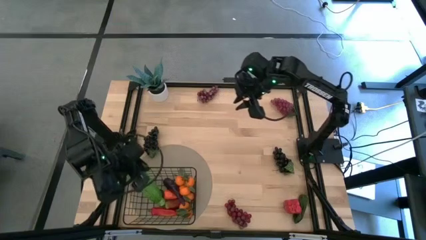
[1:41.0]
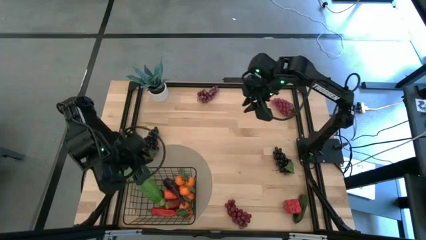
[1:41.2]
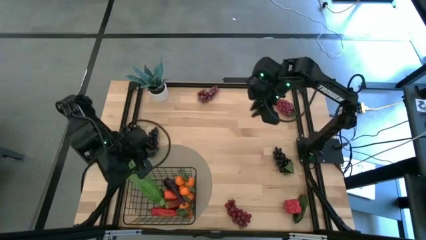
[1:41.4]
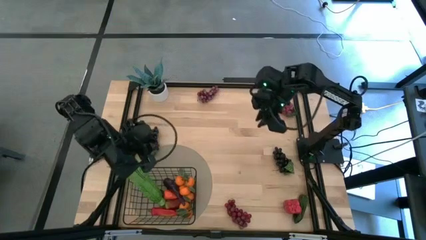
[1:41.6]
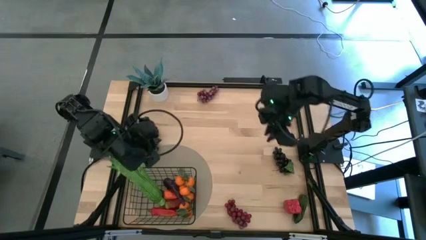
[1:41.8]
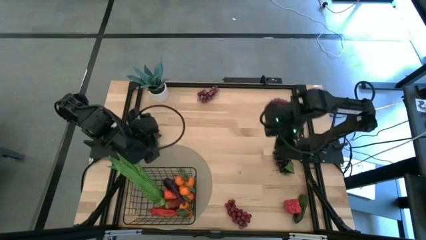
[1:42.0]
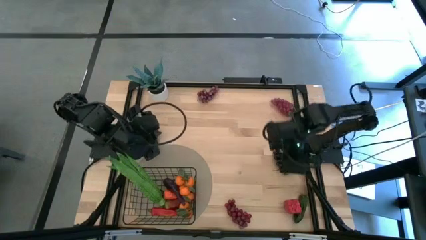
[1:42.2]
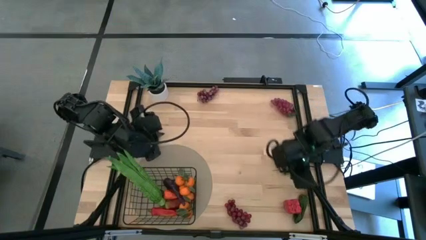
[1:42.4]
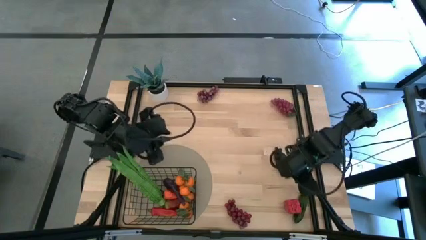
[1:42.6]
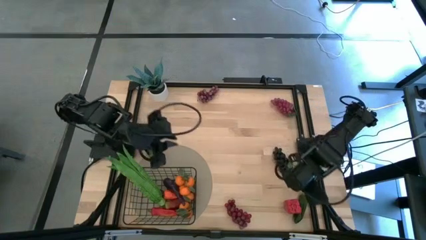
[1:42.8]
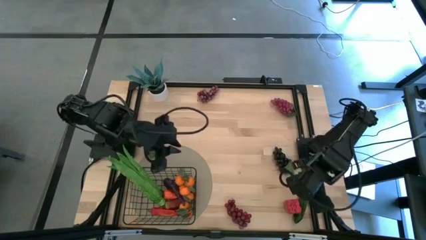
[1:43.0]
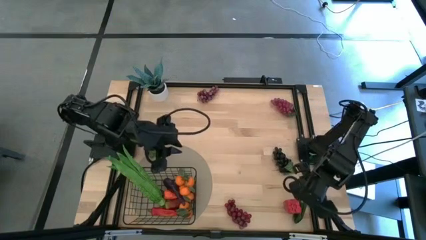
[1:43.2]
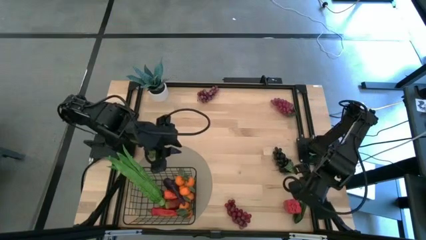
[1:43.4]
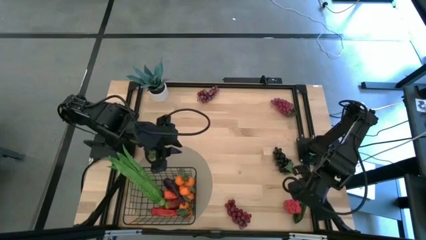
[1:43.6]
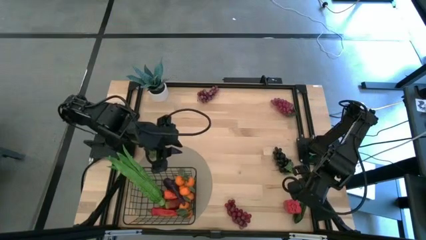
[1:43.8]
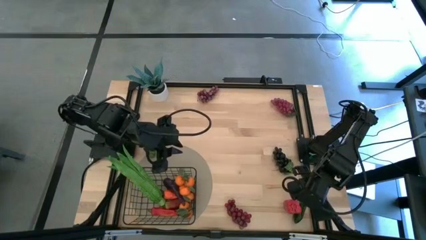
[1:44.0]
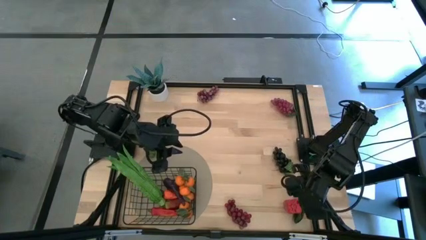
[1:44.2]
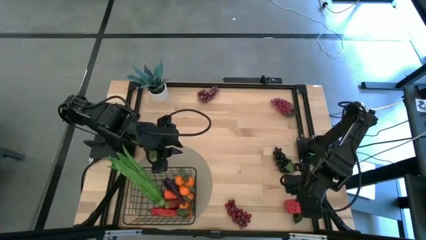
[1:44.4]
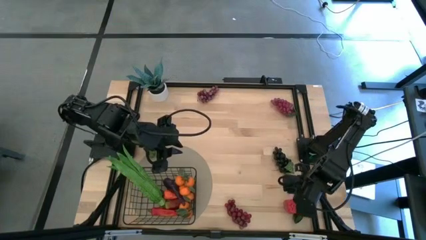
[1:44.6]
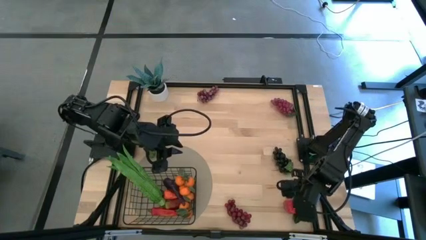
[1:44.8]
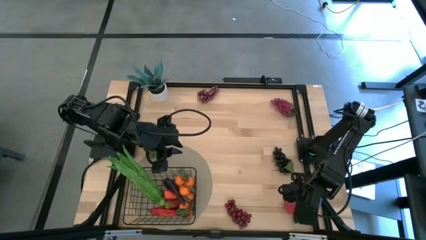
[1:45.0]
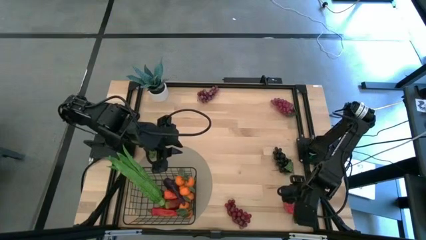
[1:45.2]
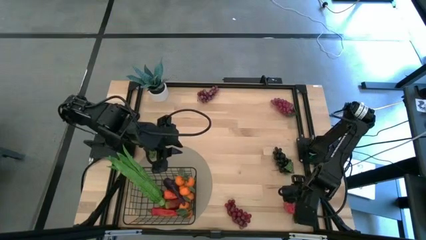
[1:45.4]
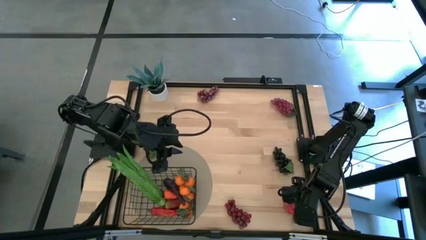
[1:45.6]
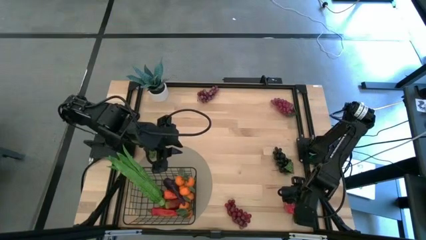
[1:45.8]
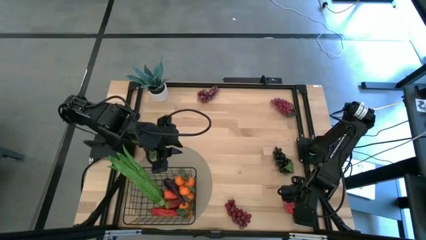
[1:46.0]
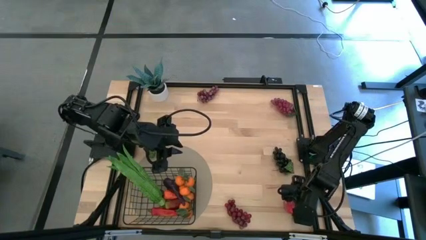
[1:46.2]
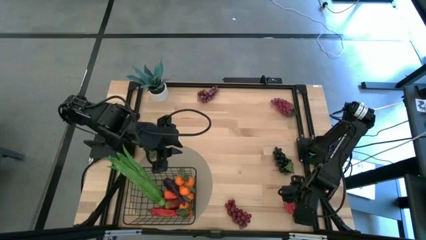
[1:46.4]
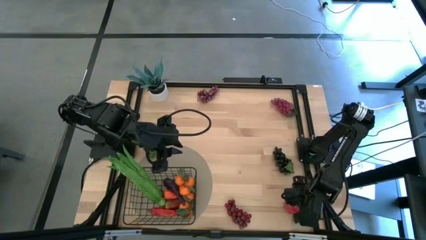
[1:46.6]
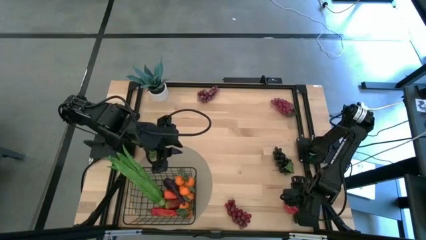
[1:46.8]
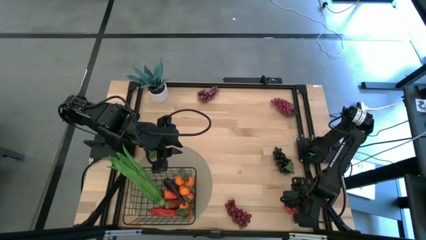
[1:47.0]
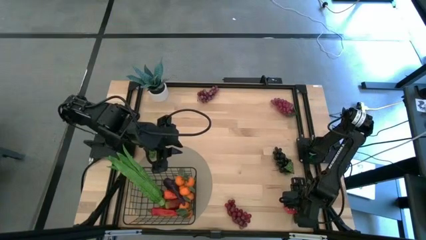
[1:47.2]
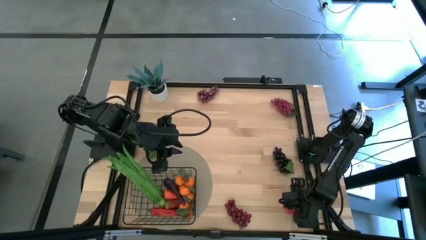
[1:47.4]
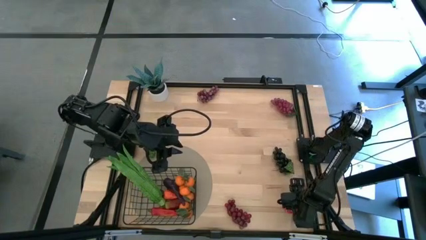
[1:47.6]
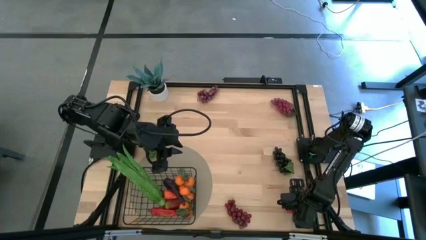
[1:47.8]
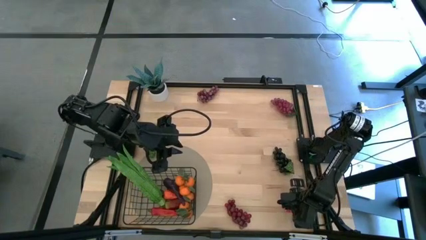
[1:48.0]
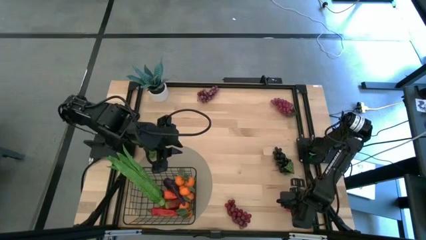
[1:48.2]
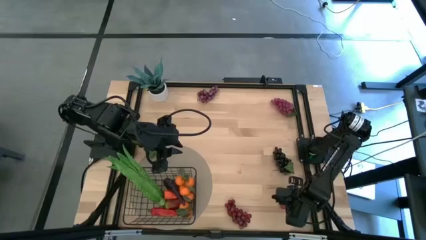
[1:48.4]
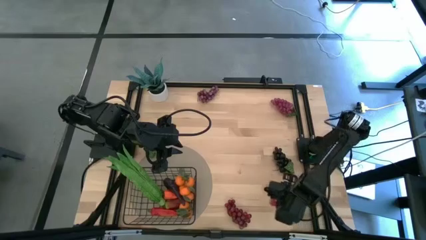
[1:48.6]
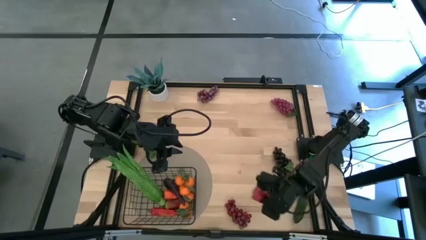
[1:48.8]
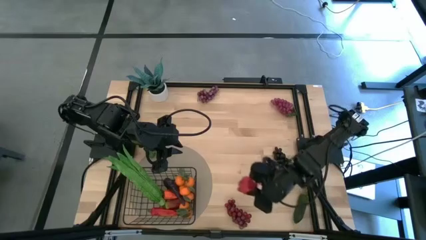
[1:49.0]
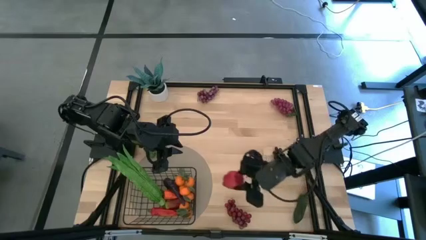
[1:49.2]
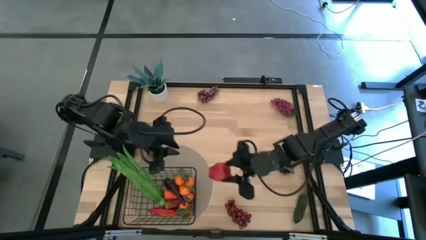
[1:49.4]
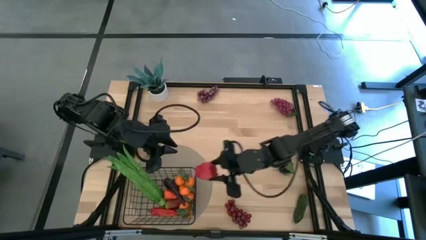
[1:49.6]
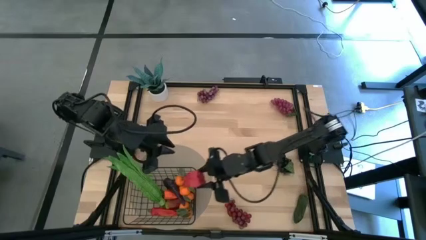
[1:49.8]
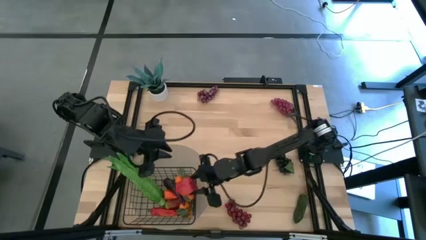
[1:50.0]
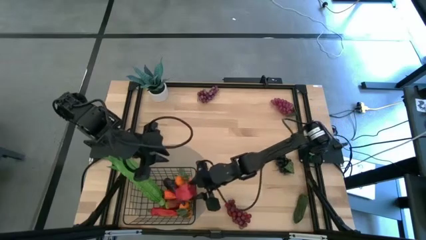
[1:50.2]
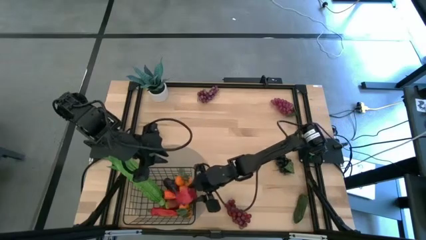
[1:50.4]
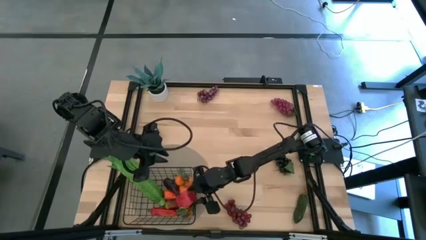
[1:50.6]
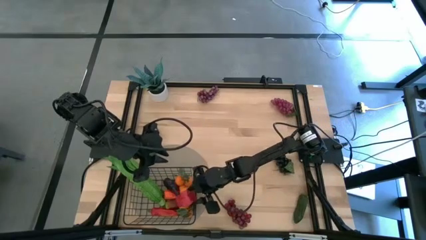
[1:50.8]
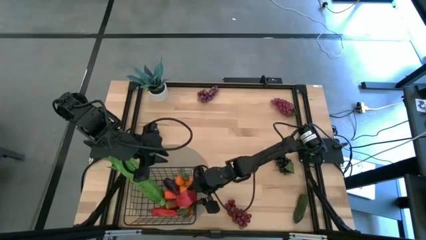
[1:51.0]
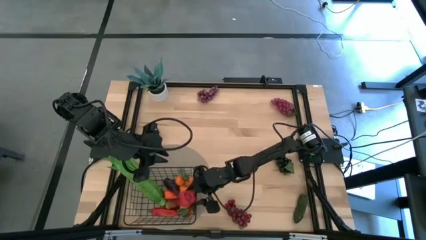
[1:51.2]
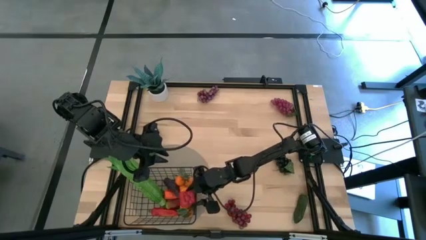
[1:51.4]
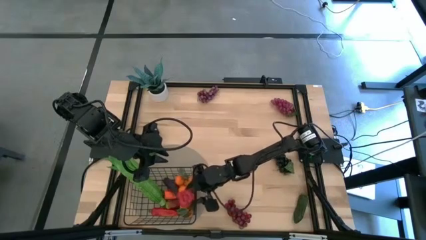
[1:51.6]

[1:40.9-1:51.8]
Task: Build produce basket
Put the red bell pepper into the wire basket

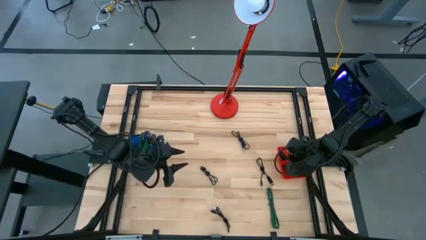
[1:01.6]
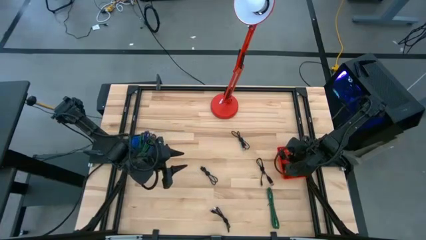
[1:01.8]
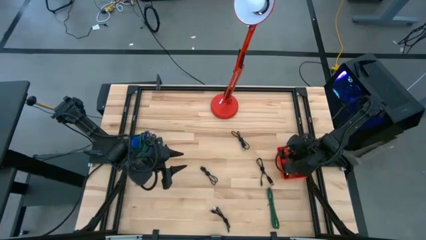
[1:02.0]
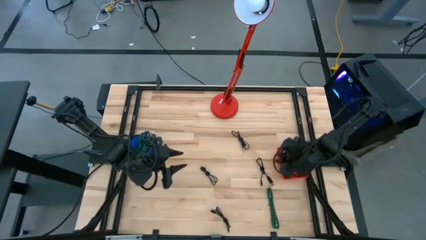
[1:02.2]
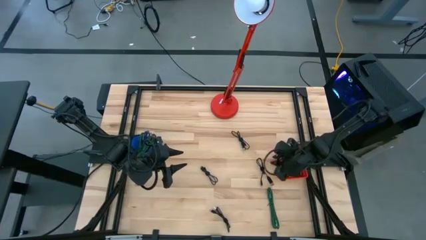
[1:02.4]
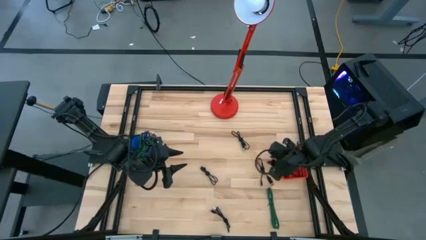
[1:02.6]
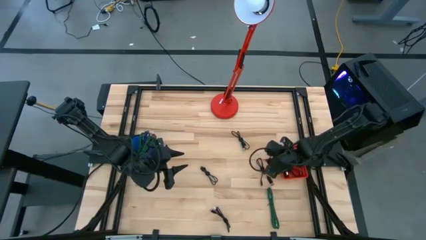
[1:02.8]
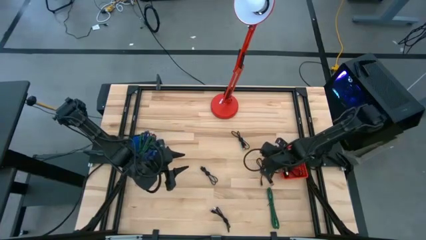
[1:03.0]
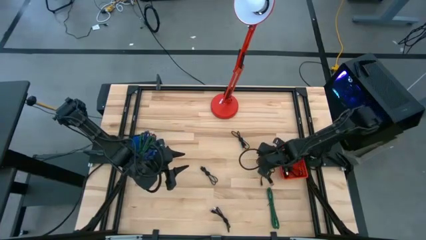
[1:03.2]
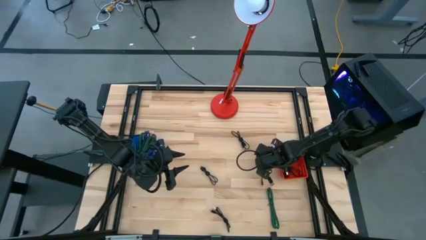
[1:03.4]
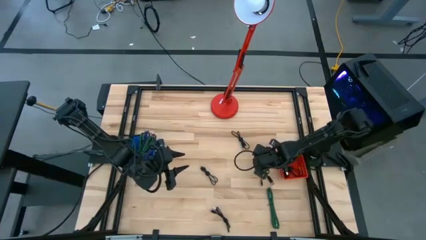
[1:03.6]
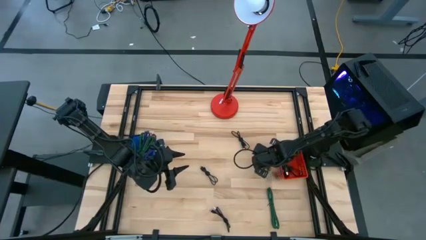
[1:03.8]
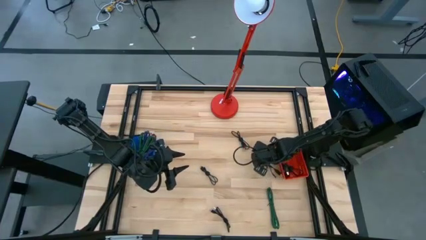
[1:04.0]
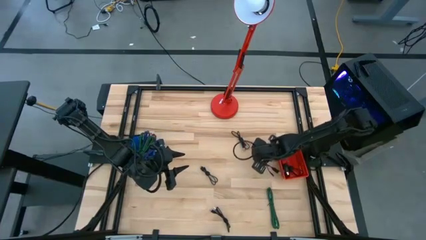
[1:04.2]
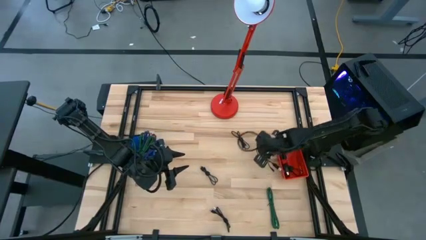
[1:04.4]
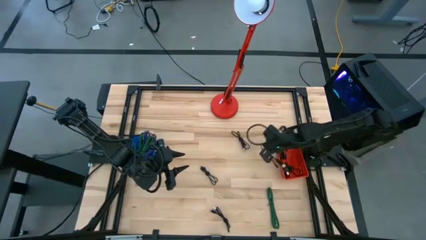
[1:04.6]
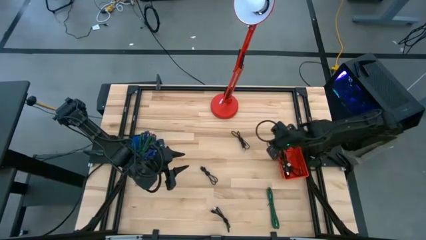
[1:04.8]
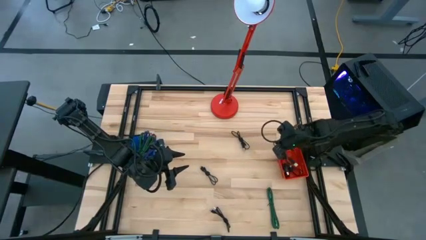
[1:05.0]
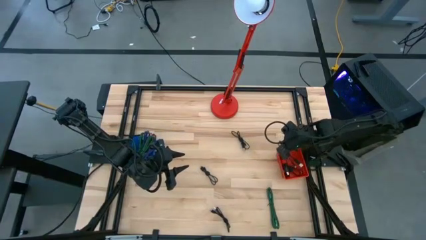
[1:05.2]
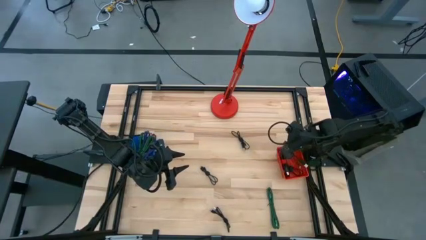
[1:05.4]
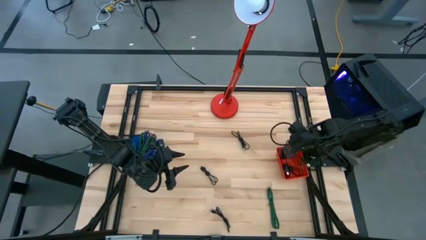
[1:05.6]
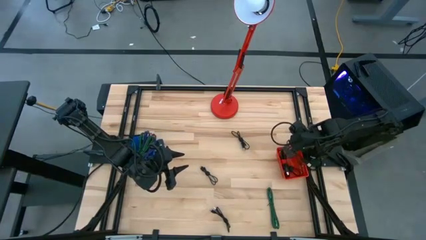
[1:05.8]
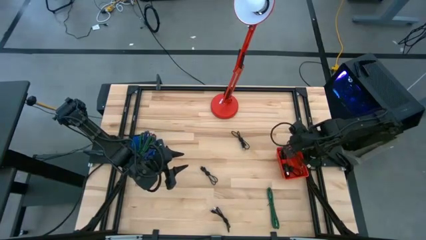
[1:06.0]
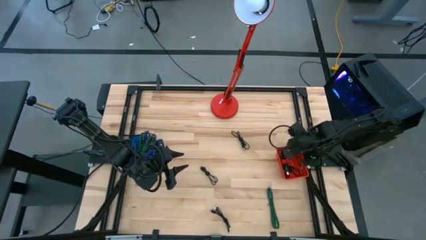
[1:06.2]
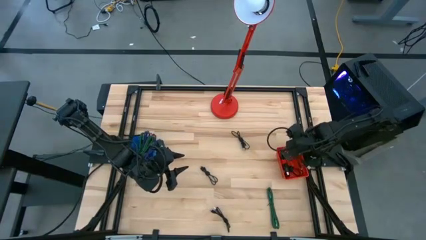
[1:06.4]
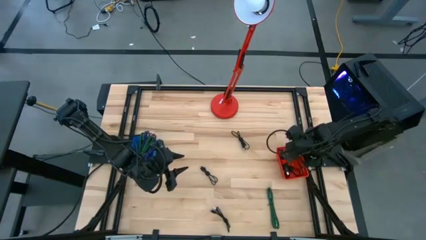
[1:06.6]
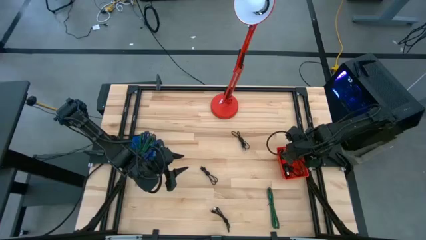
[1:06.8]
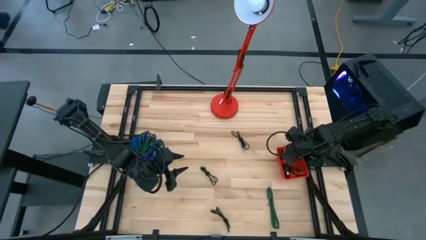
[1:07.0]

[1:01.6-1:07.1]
Task: Pick & Place USB Port
Put the black charger cable into the red bin
